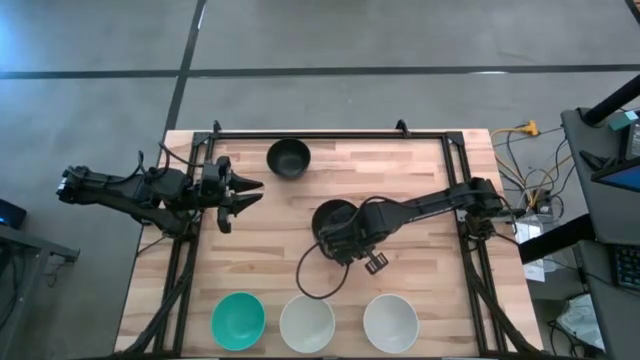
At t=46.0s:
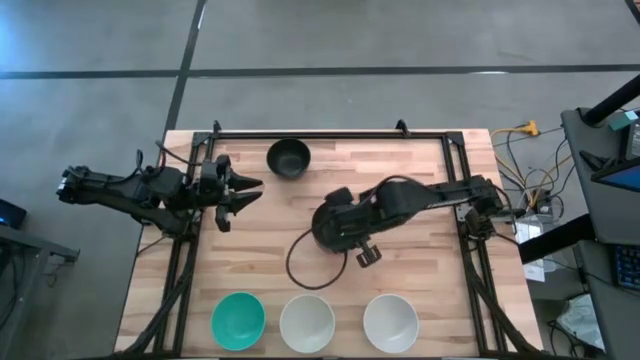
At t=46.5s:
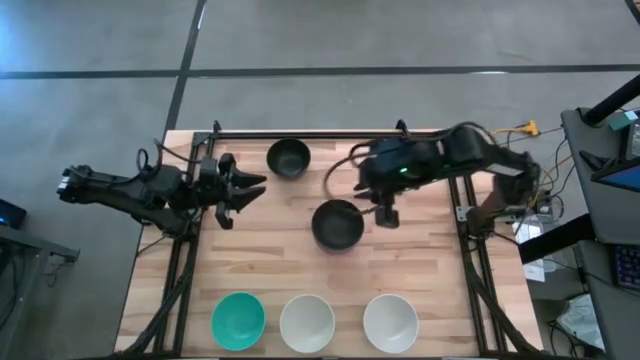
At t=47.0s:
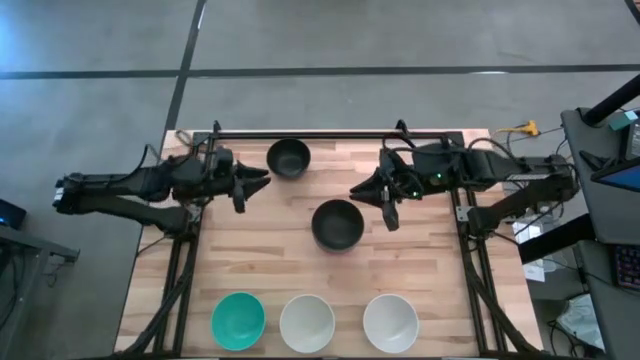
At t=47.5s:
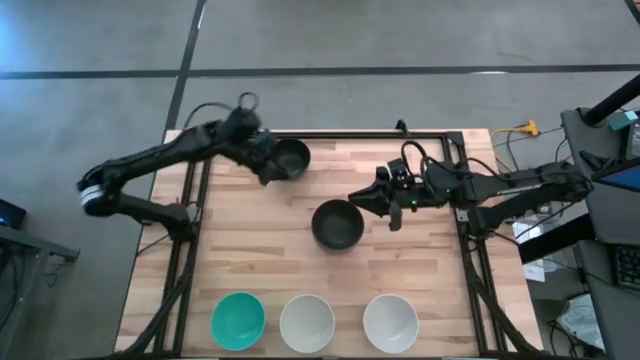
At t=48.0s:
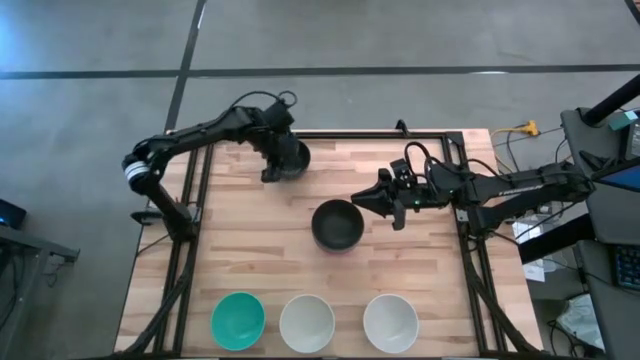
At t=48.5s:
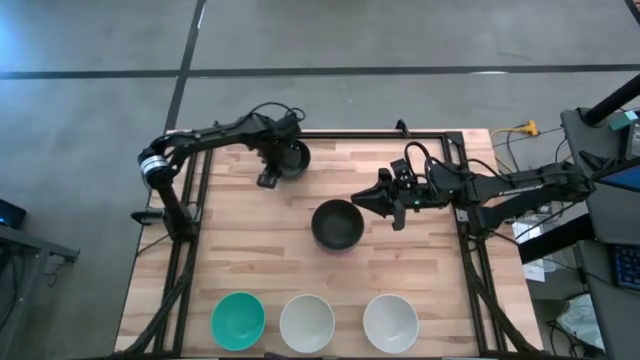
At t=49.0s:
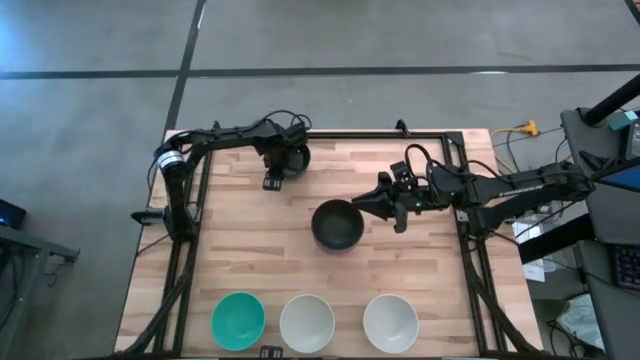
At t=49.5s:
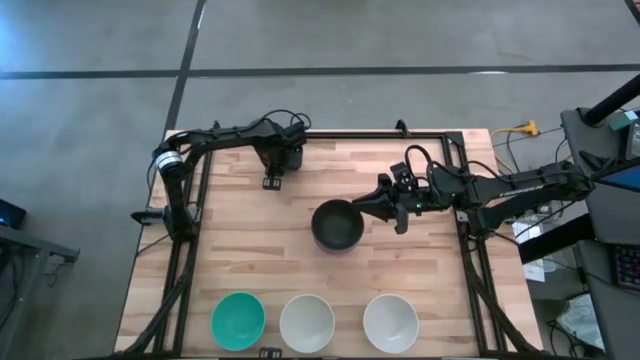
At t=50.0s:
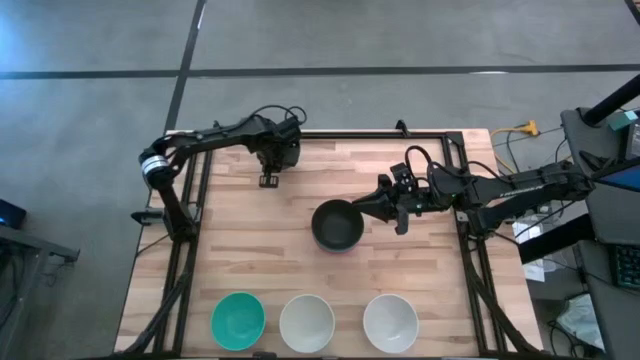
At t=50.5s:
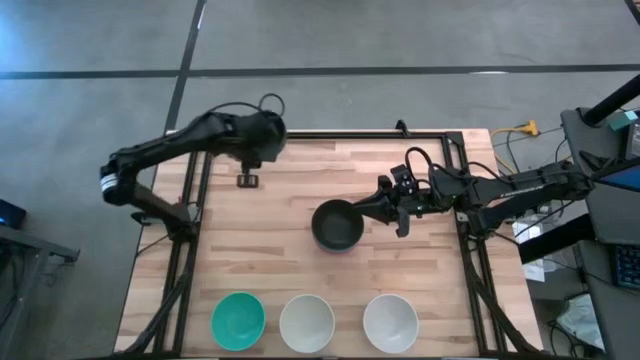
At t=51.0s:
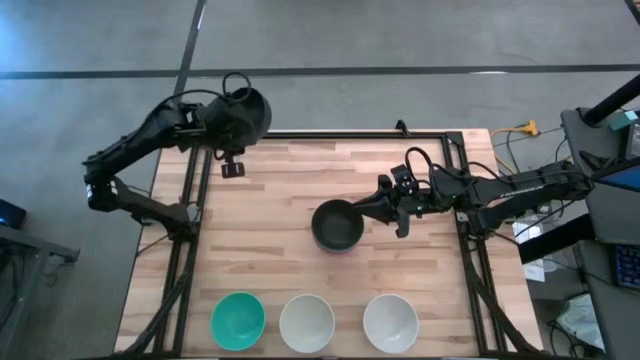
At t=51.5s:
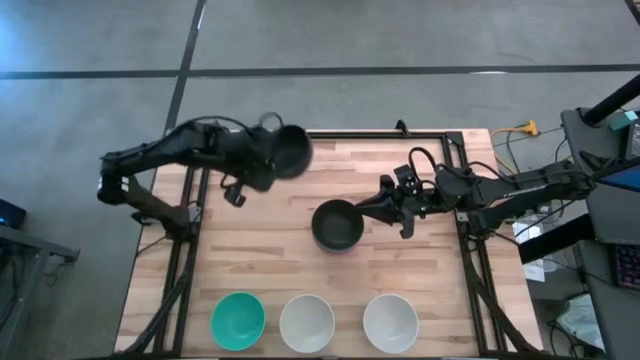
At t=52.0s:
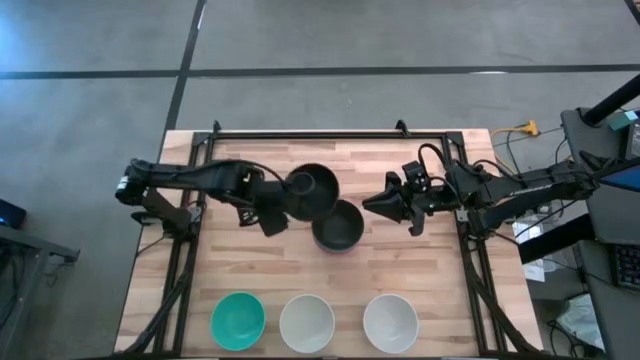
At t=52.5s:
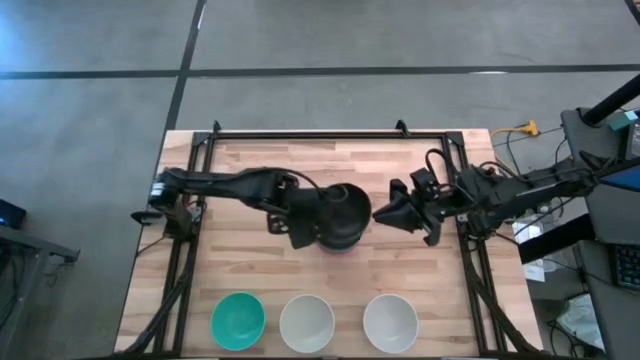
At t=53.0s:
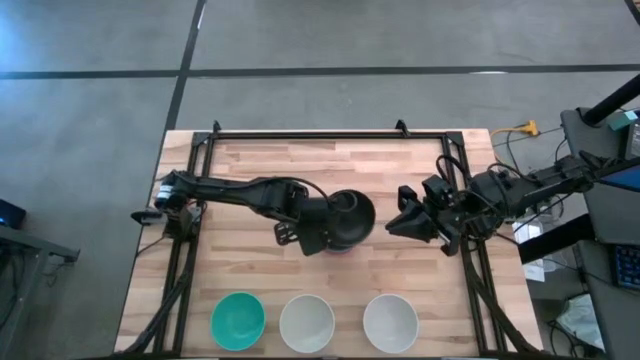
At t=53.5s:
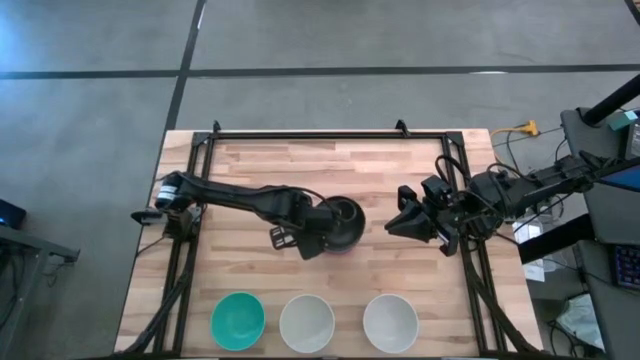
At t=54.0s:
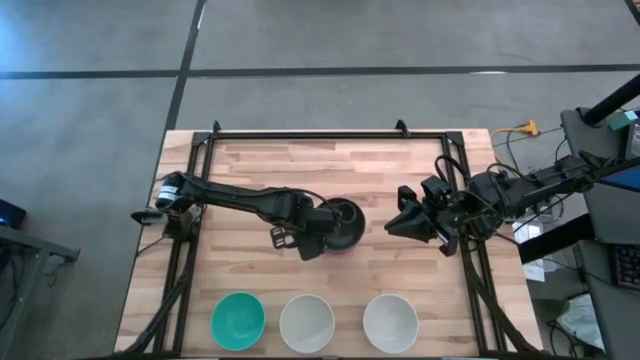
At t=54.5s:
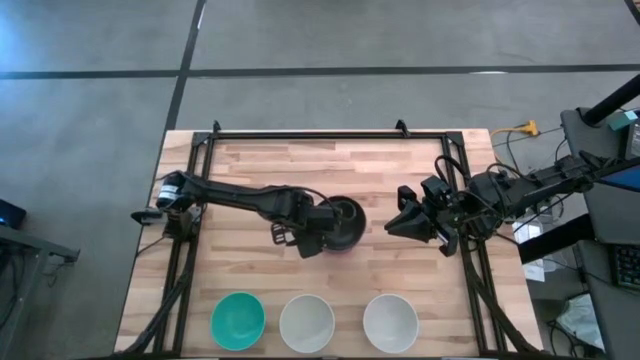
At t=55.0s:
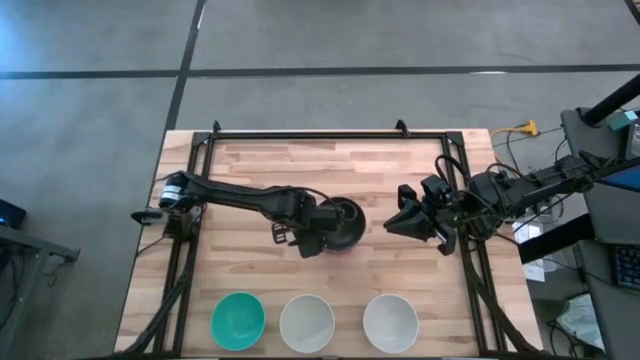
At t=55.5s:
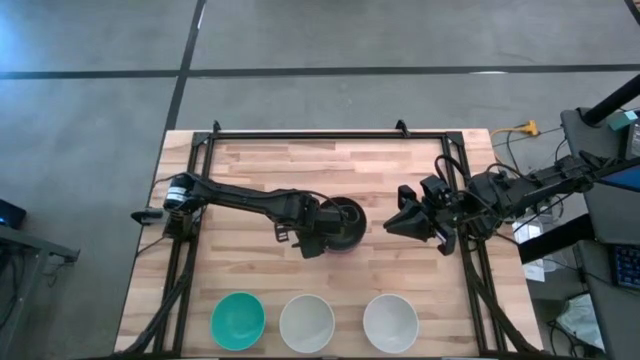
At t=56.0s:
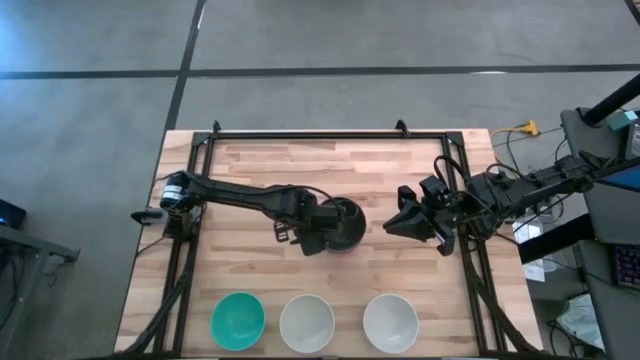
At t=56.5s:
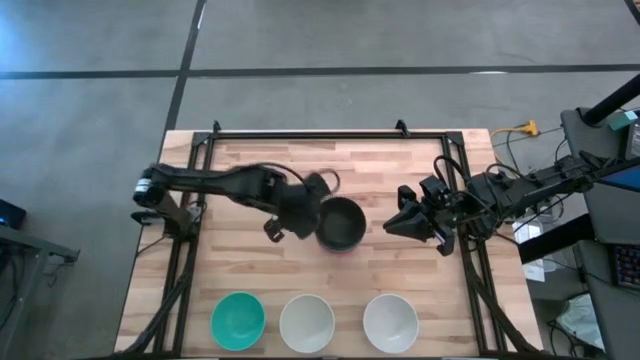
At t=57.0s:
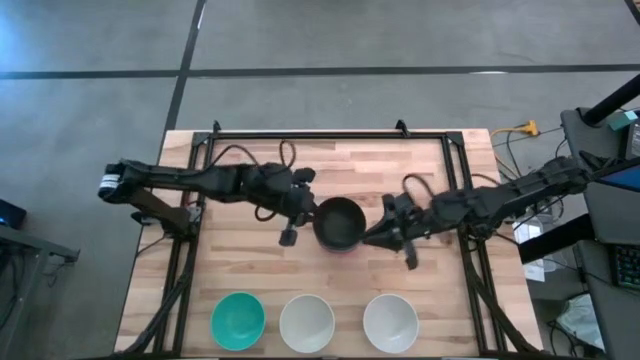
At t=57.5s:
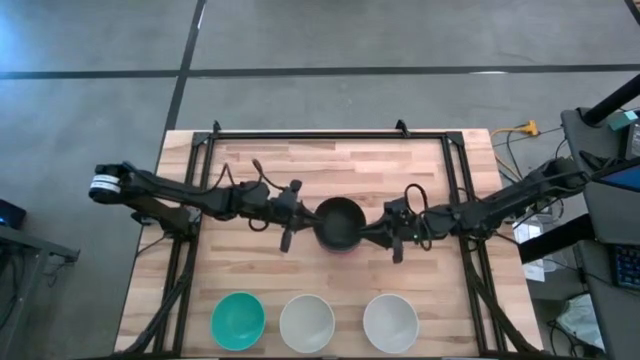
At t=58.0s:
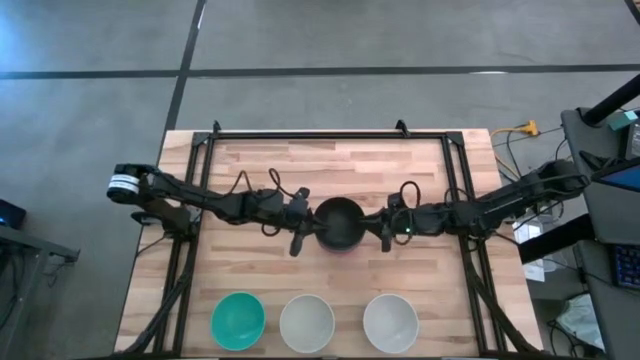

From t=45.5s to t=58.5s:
Task: Nest bowls inside each other
Stack the black bowl on the black bowl

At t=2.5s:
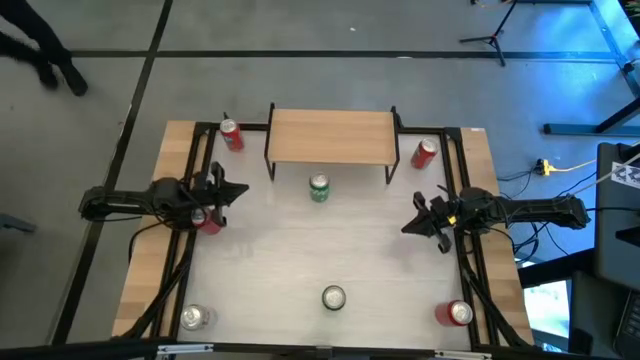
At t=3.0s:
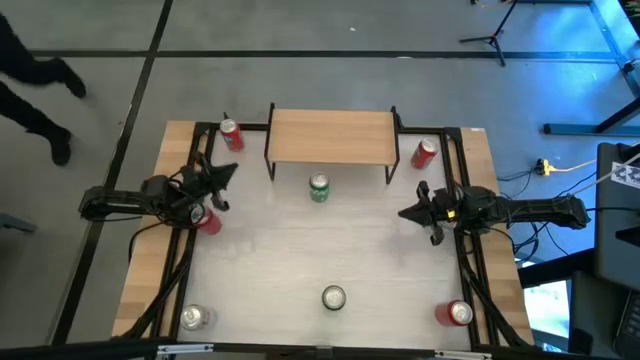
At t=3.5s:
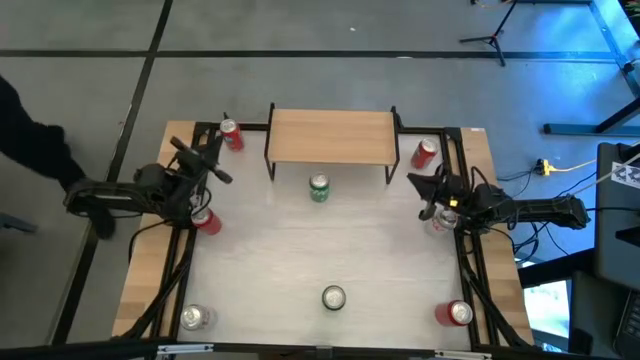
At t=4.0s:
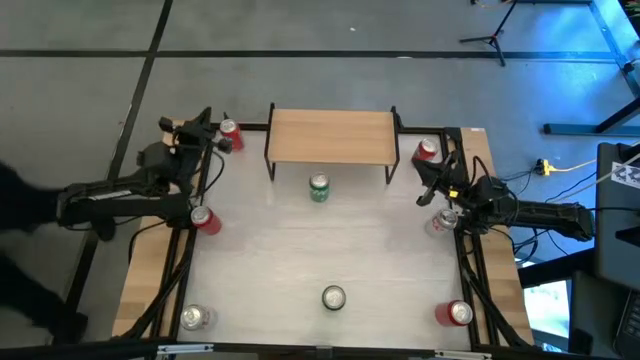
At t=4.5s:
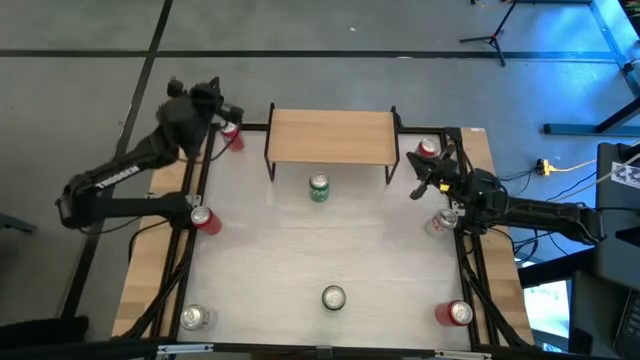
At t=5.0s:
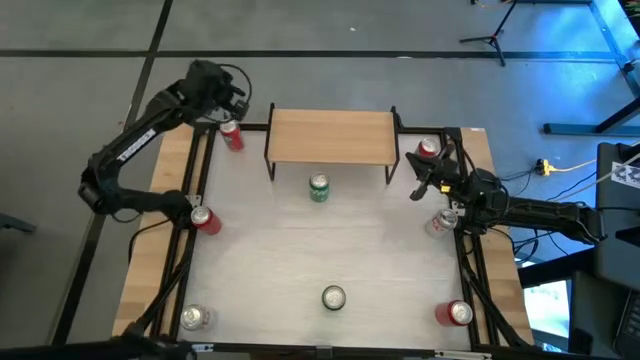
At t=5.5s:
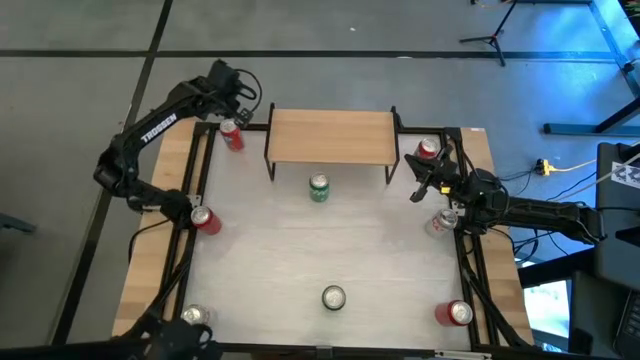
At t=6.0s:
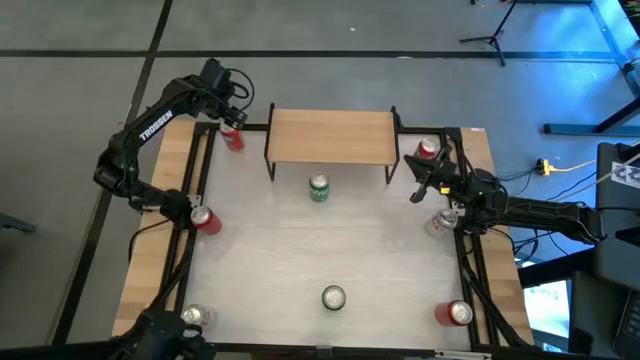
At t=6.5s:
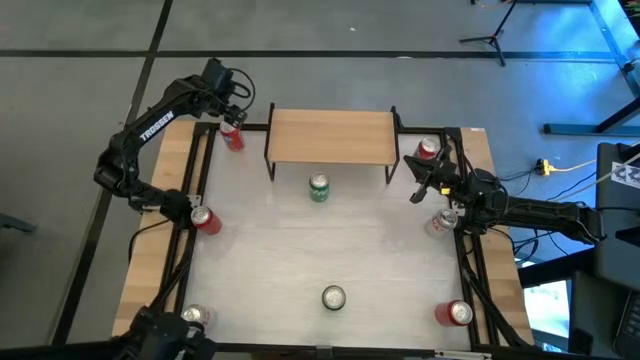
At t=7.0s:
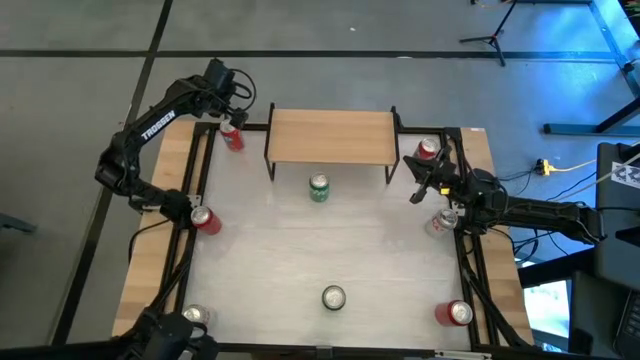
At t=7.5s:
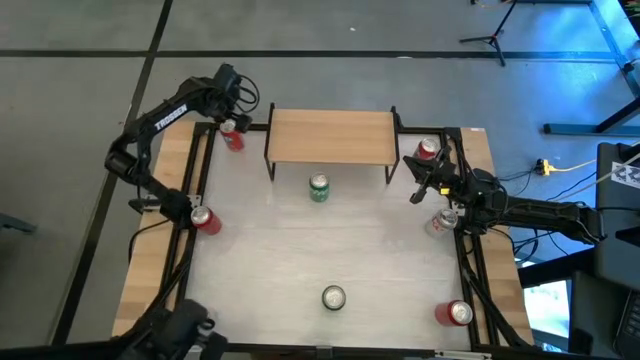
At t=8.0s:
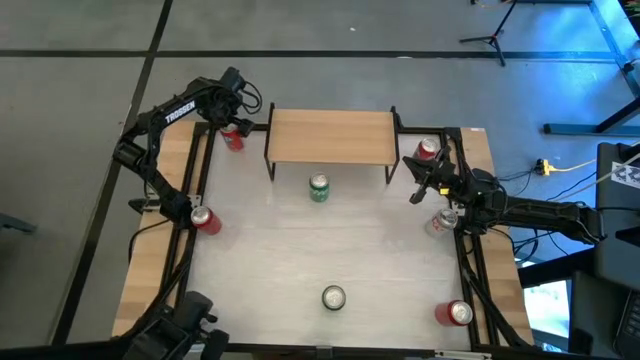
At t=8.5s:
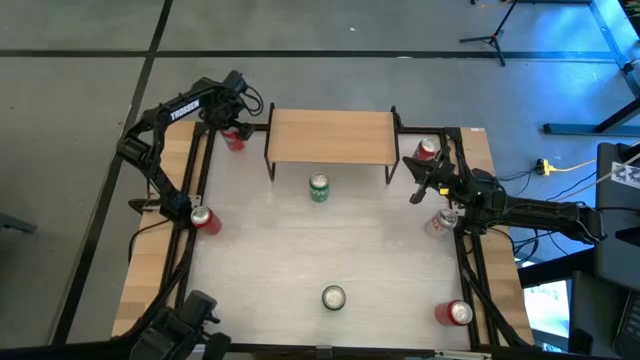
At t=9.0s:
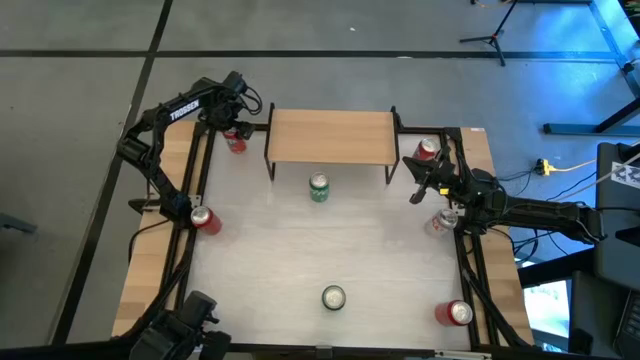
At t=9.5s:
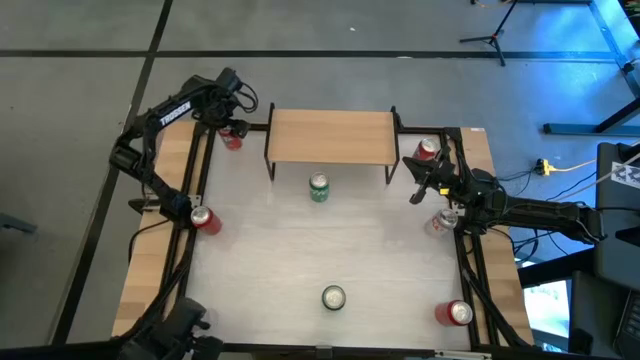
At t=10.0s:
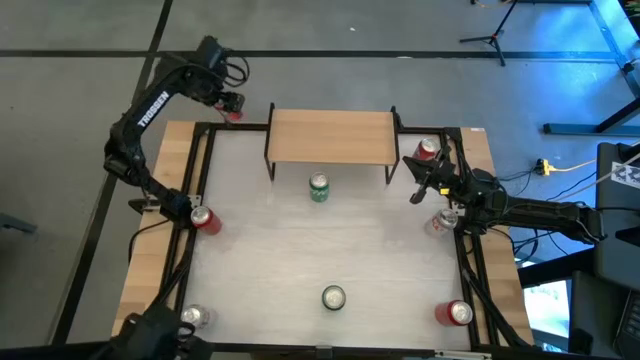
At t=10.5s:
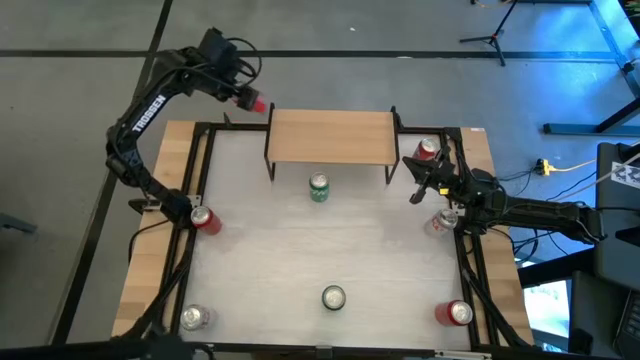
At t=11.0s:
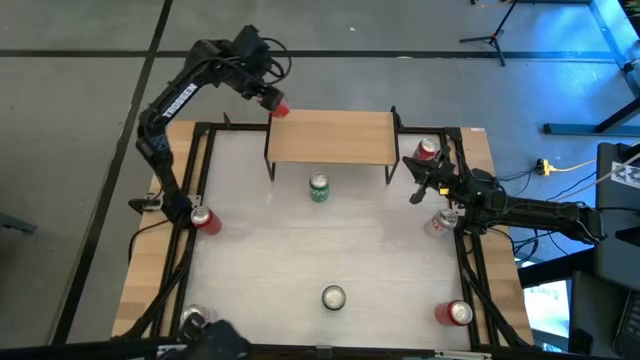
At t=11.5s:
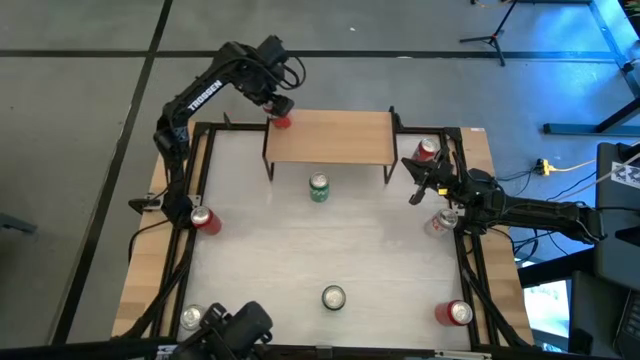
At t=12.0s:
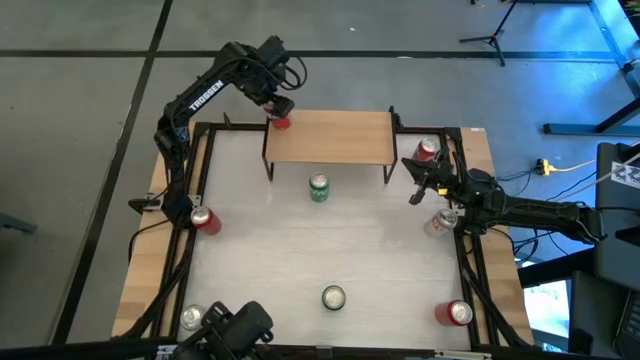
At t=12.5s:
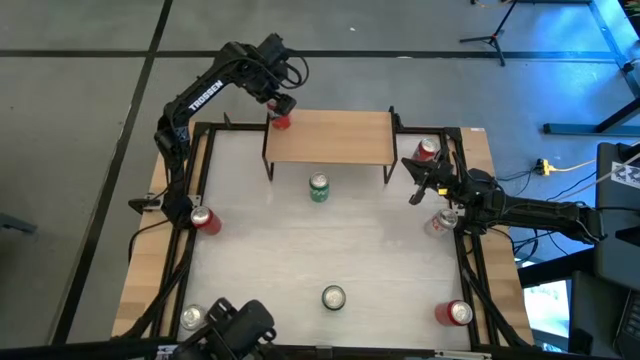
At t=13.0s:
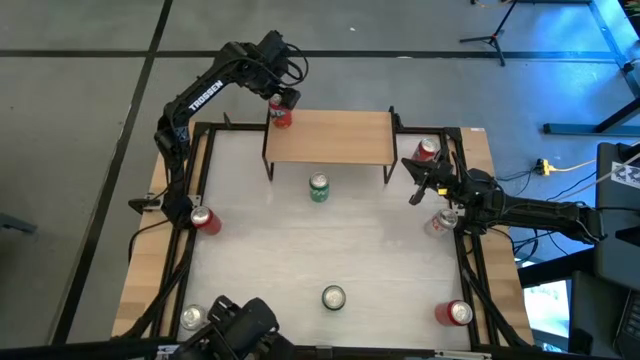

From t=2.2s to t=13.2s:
Task: Place canned beverage on shelf
Put the left red soda can on the shelf
